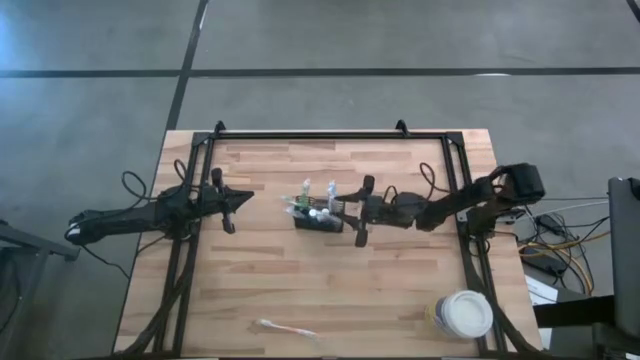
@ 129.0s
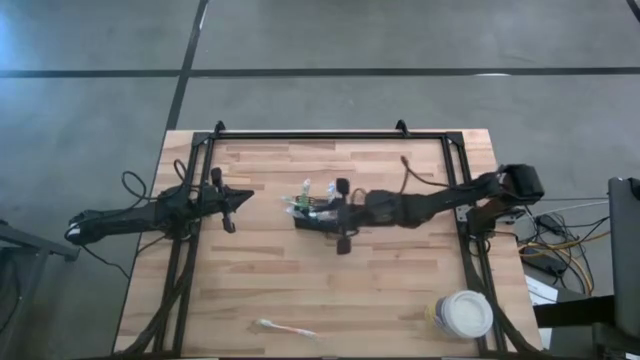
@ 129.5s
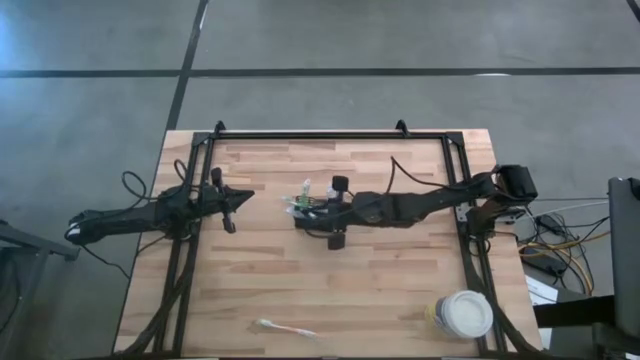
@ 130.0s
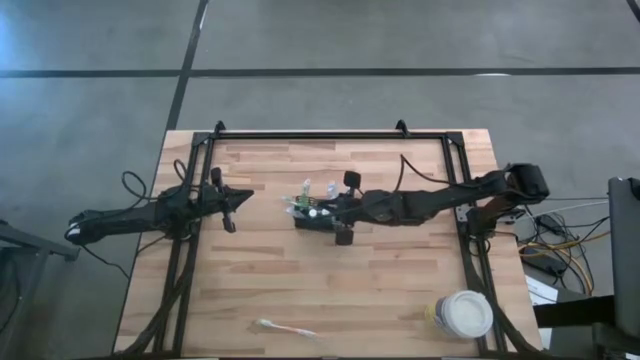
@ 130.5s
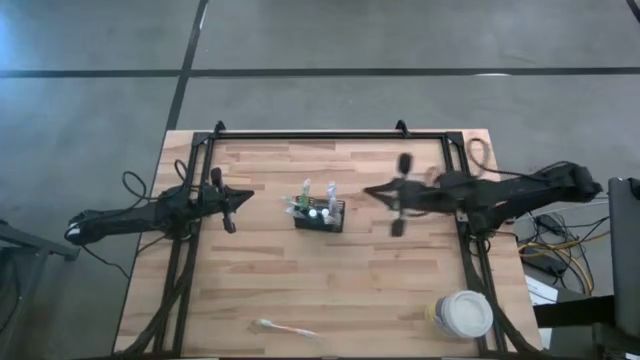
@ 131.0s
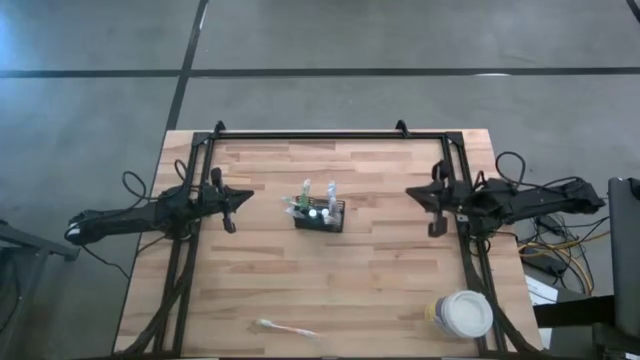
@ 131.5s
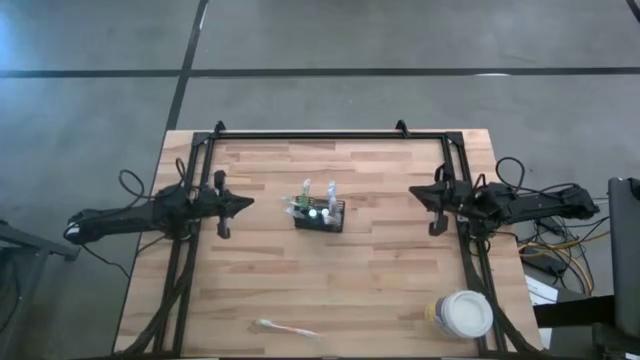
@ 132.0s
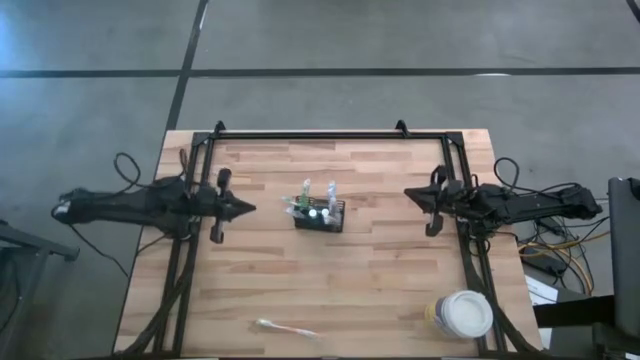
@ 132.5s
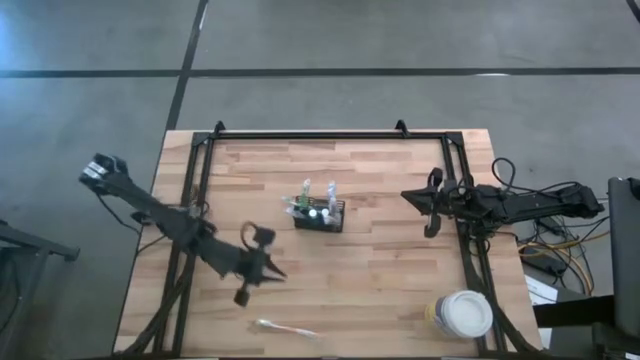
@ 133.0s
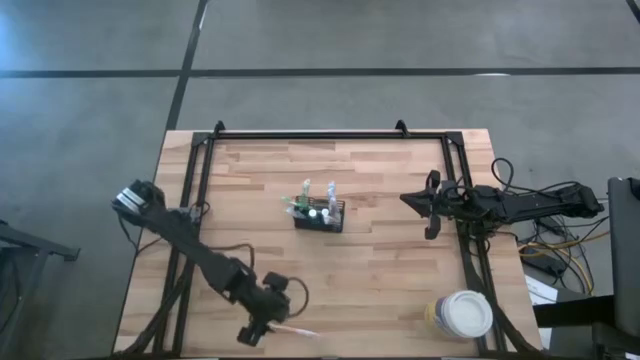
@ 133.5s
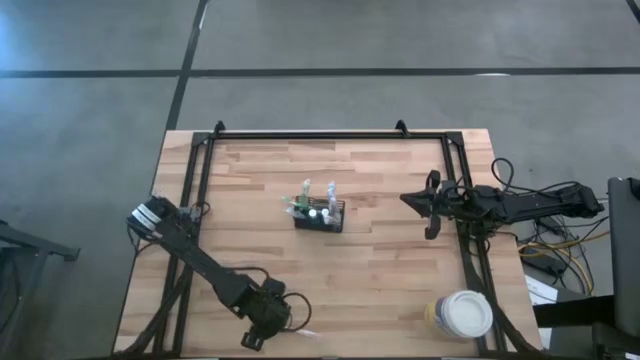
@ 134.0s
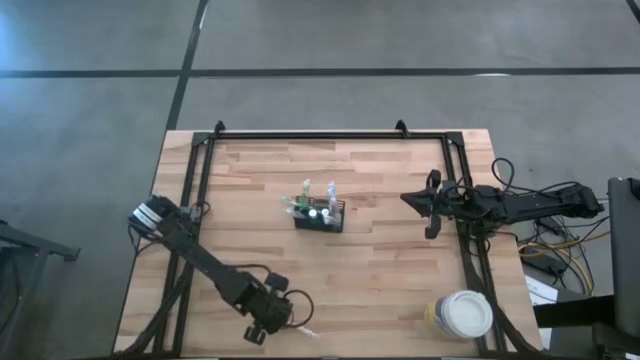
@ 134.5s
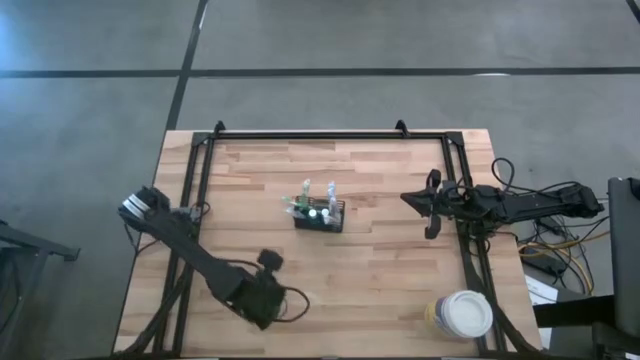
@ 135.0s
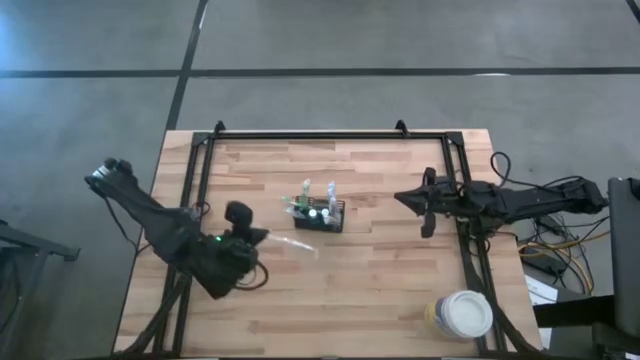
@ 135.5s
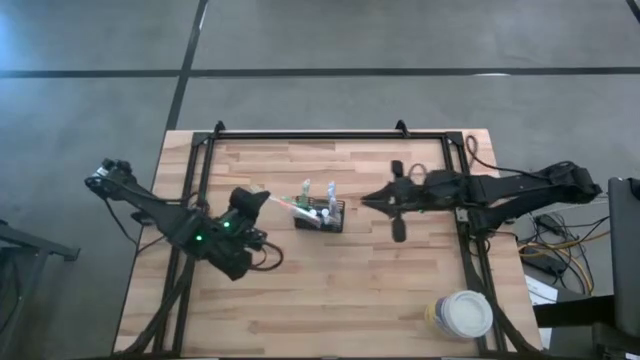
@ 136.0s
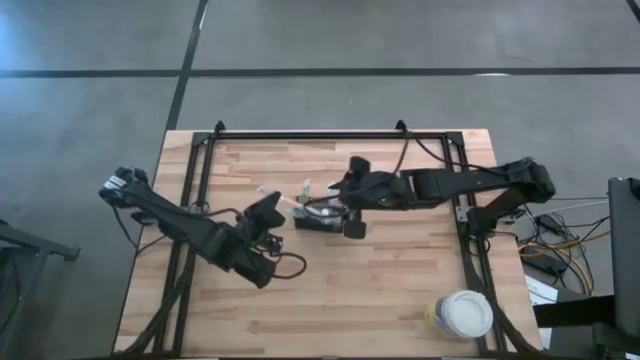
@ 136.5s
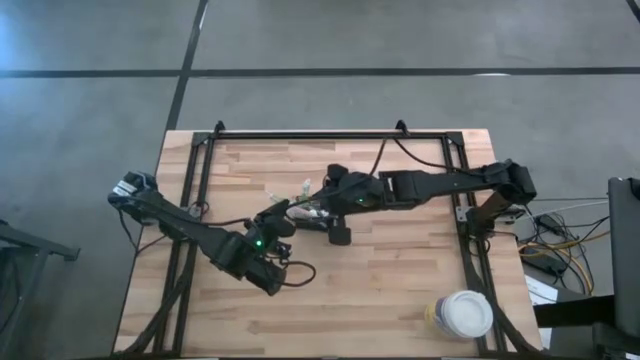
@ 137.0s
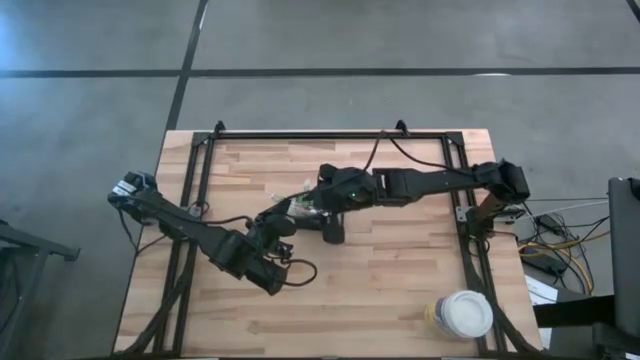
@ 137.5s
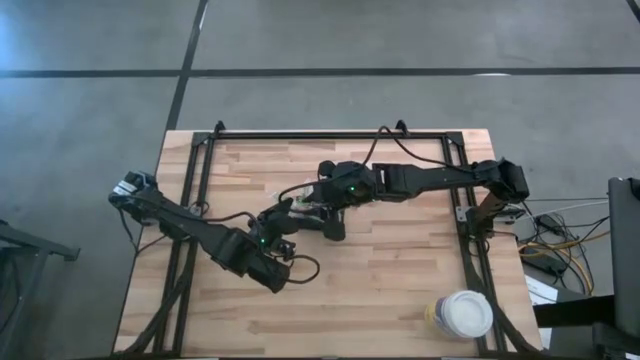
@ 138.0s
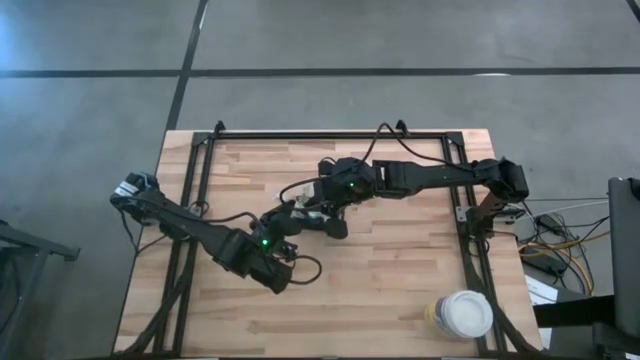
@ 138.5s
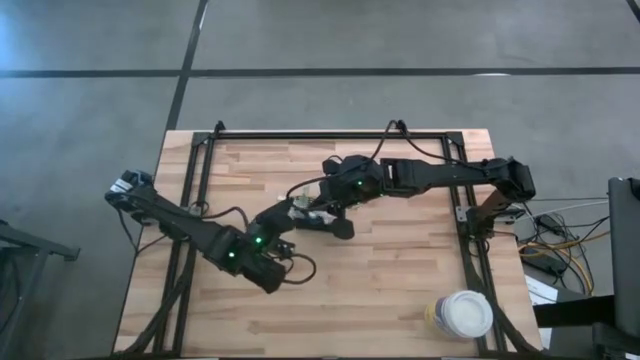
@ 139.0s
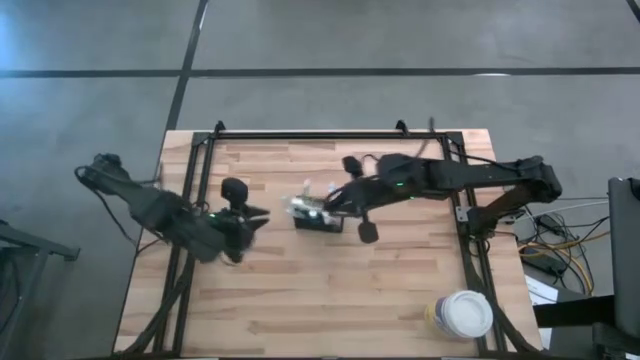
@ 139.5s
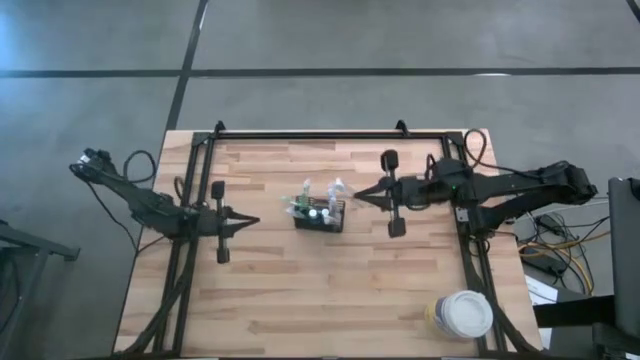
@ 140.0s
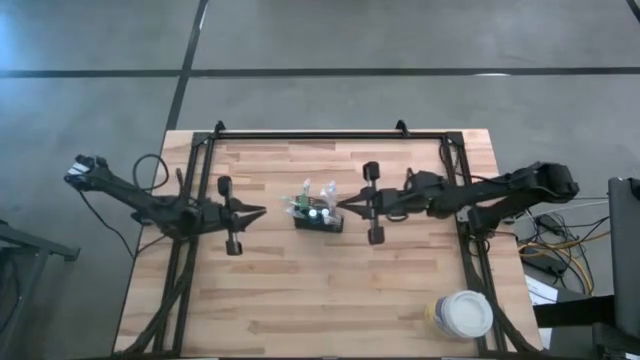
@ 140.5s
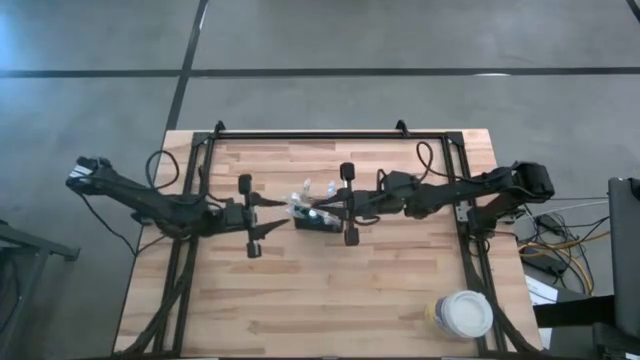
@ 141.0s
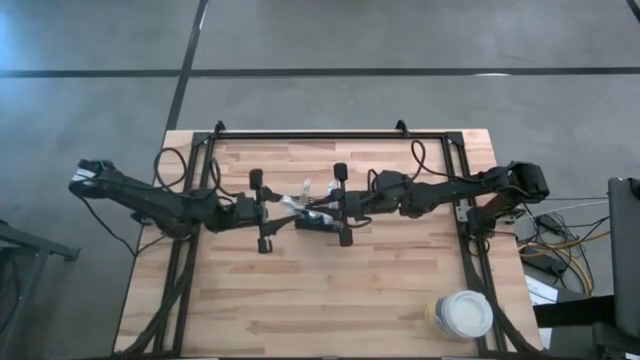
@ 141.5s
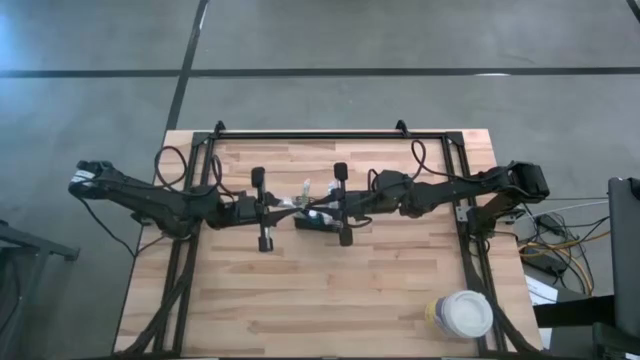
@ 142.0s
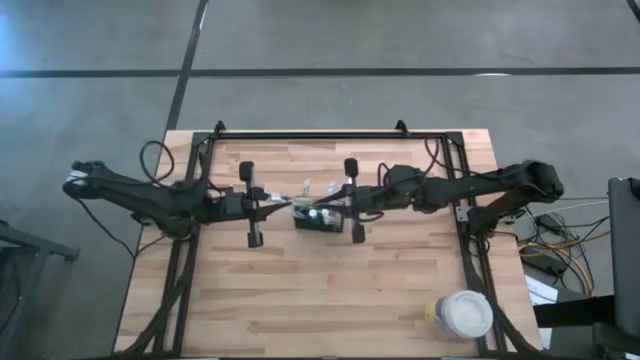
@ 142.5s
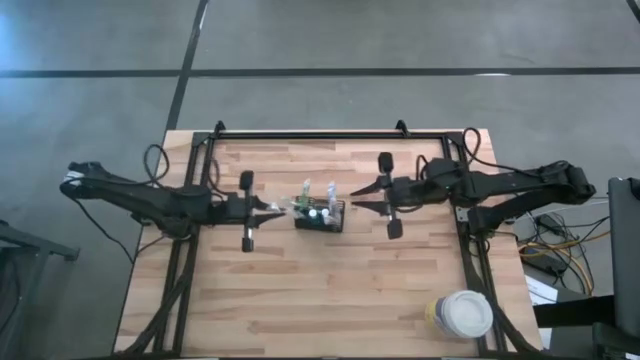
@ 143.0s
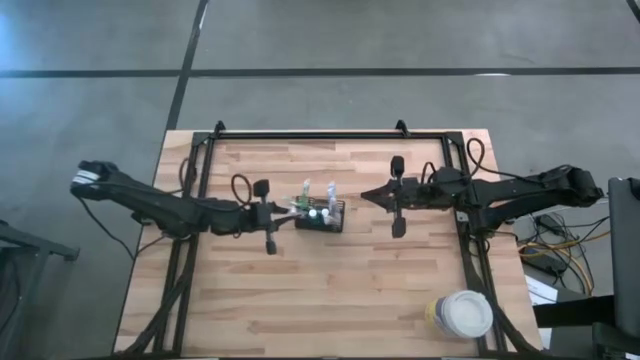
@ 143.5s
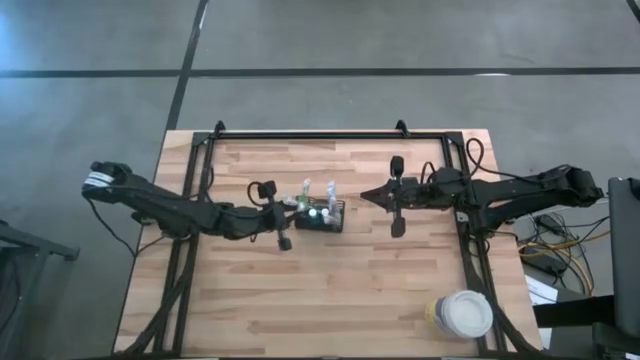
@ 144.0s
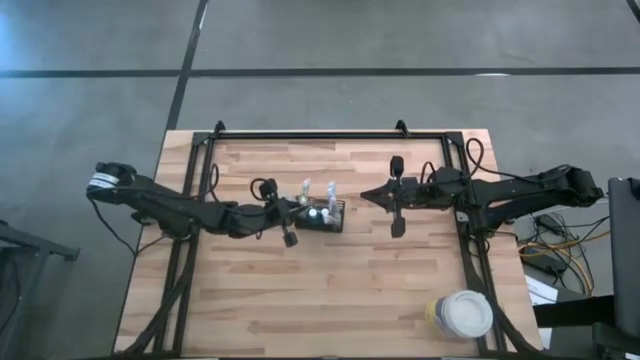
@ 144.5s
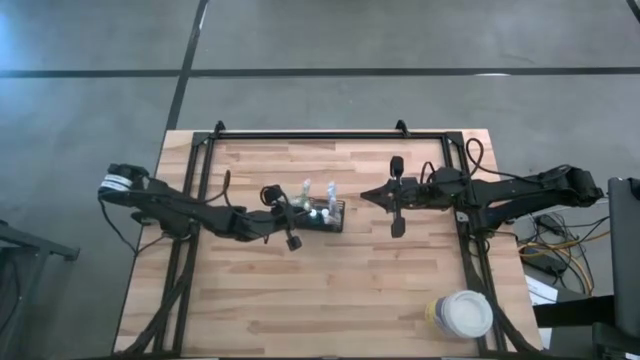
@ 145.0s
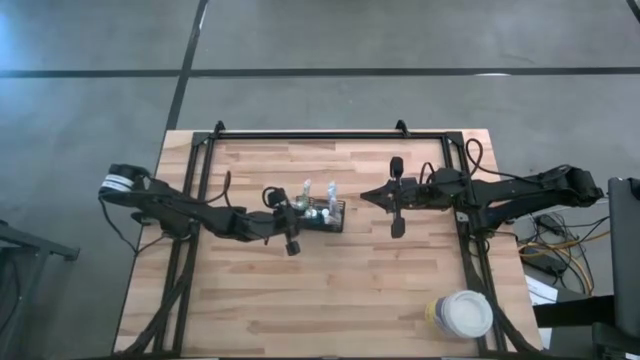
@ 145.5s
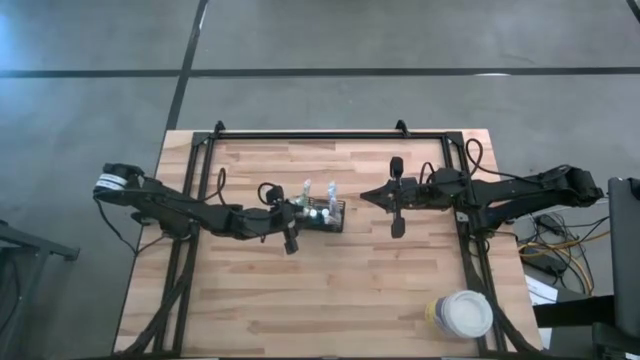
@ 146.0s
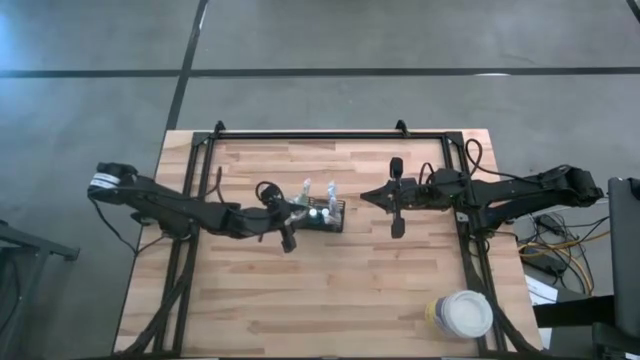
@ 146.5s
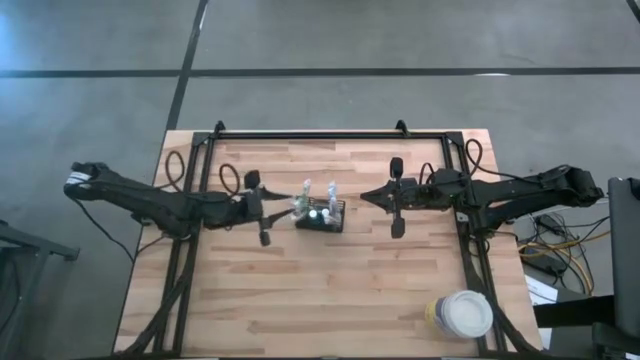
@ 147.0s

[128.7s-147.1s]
Task: Pick & Place toothbrushing station
Put the orange toothbrush into the wire organizer

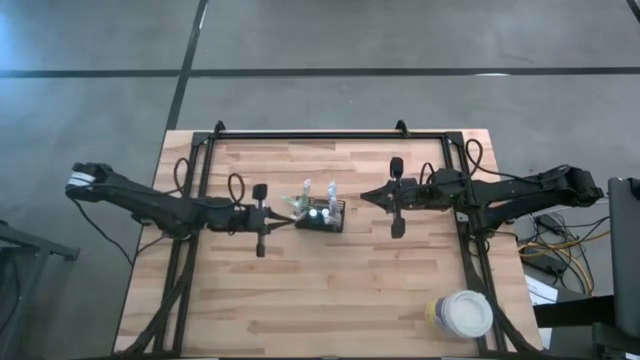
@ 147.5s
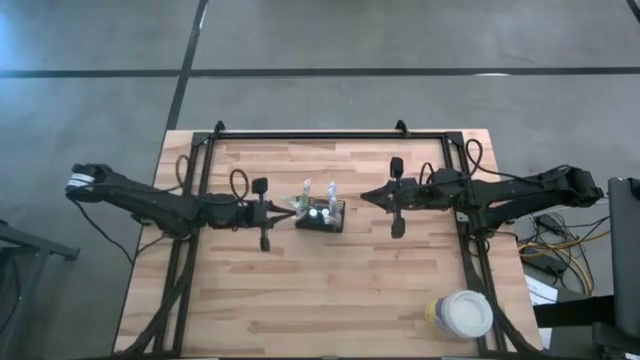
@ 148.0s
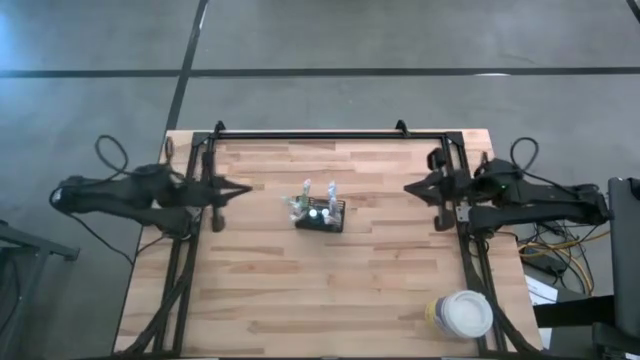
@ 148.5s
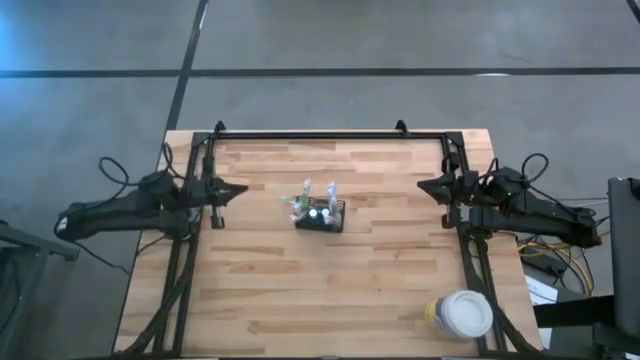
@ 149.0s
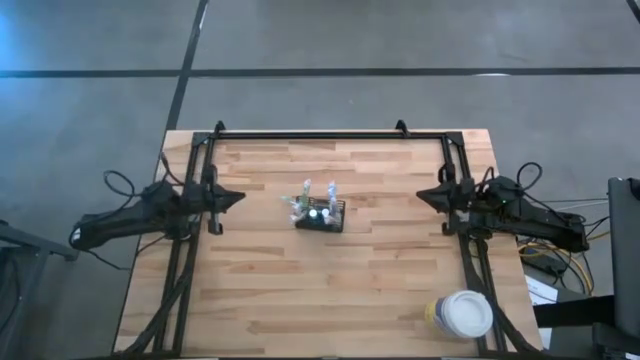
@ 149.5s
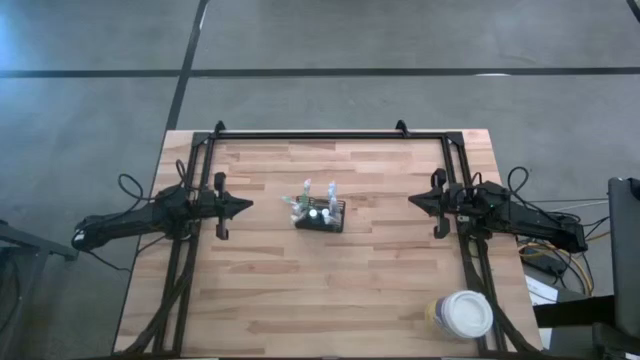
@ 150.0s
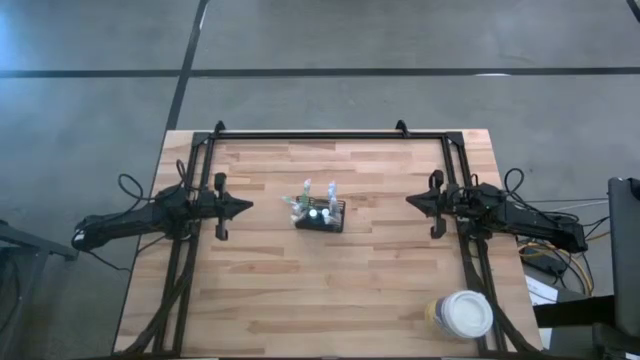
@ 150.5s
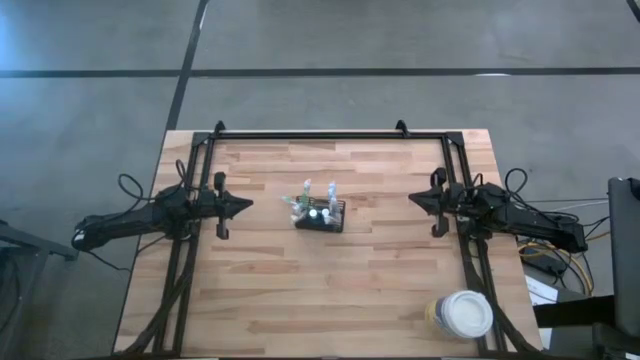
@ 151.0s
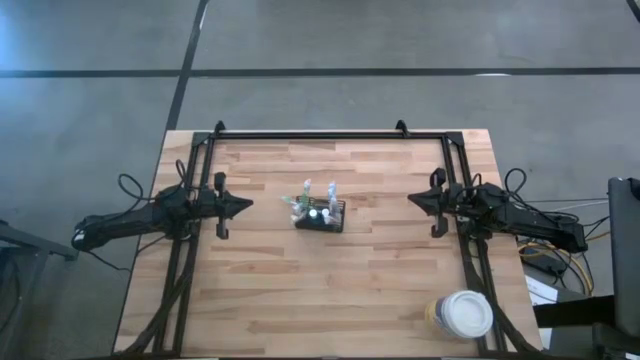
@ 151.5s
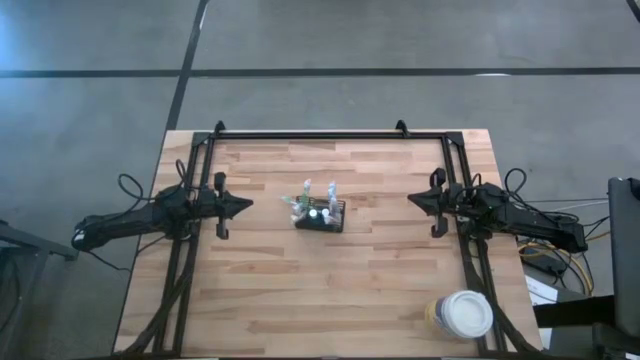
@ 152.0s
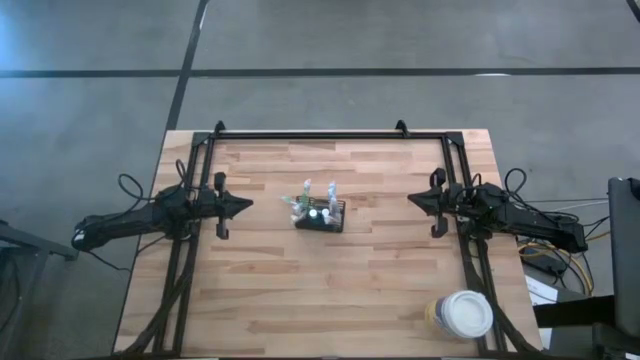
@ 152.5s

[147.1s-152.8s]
Return to Home Position
